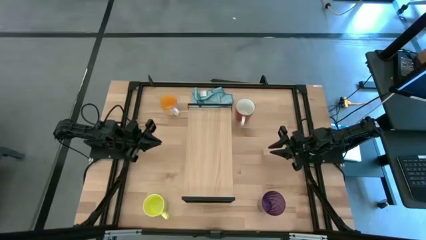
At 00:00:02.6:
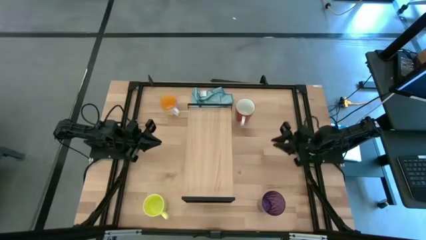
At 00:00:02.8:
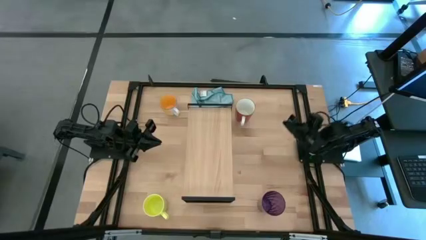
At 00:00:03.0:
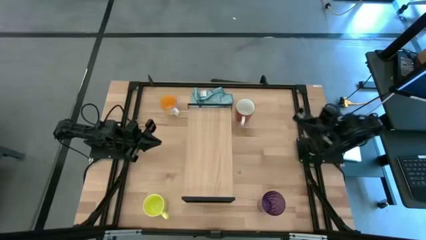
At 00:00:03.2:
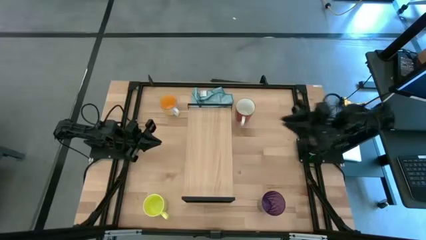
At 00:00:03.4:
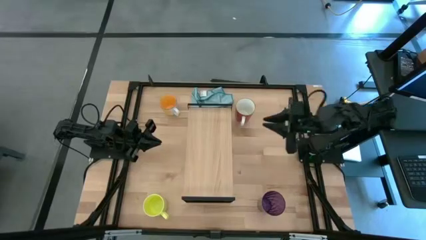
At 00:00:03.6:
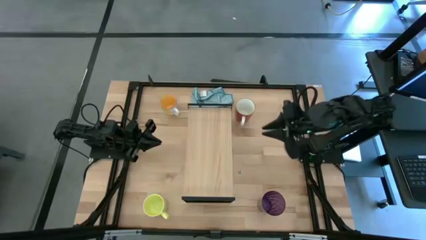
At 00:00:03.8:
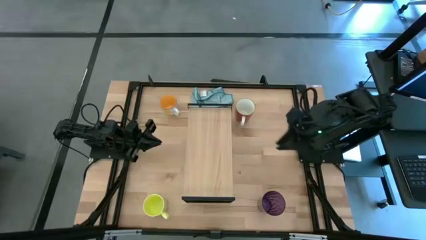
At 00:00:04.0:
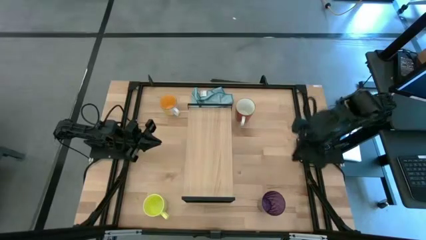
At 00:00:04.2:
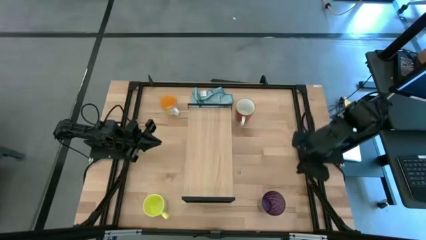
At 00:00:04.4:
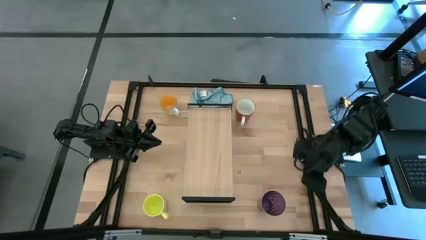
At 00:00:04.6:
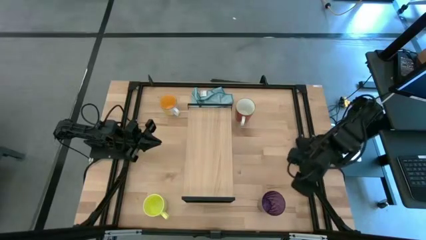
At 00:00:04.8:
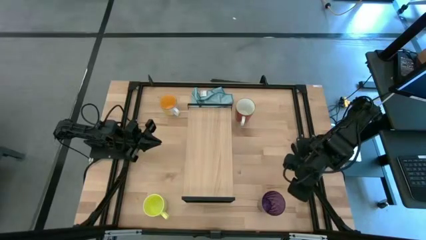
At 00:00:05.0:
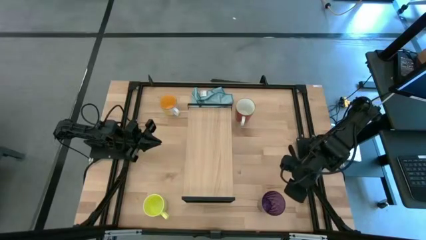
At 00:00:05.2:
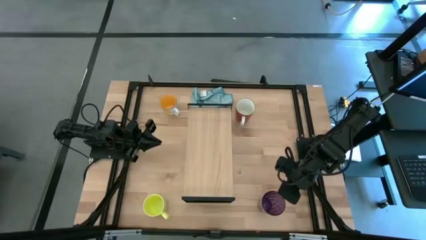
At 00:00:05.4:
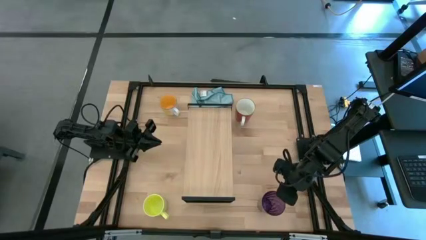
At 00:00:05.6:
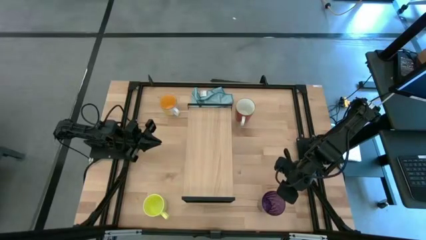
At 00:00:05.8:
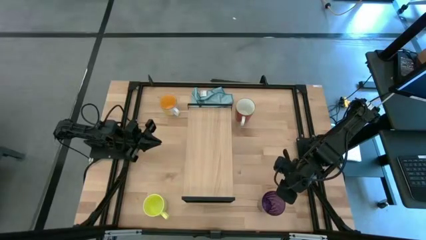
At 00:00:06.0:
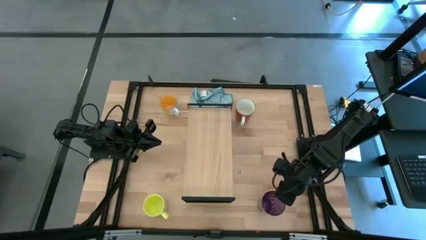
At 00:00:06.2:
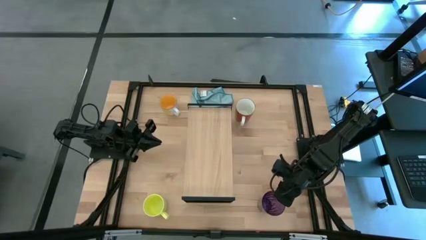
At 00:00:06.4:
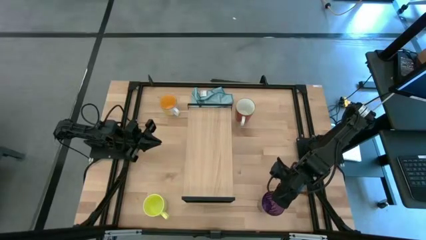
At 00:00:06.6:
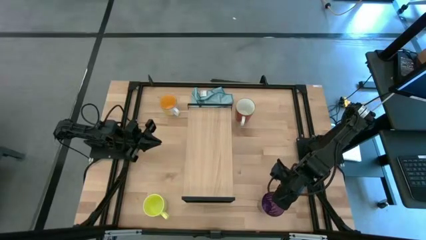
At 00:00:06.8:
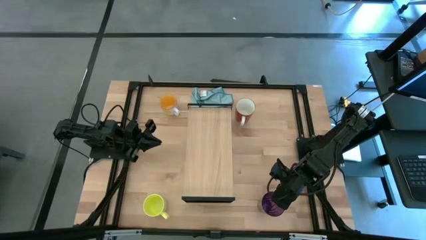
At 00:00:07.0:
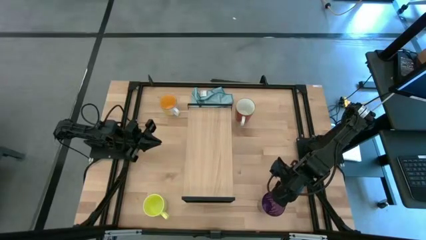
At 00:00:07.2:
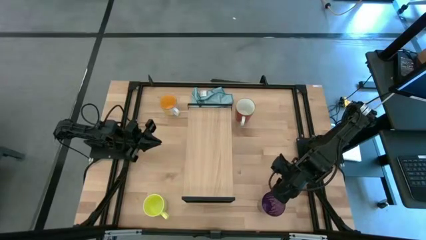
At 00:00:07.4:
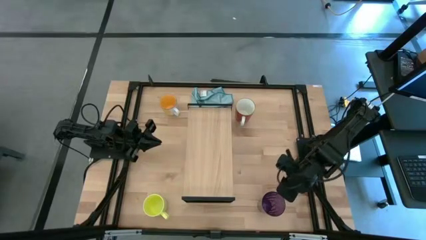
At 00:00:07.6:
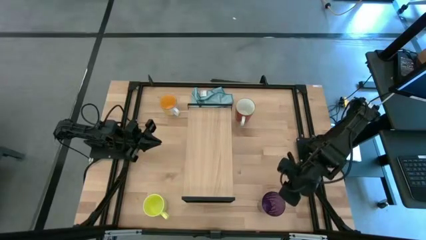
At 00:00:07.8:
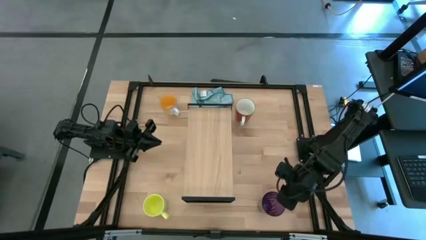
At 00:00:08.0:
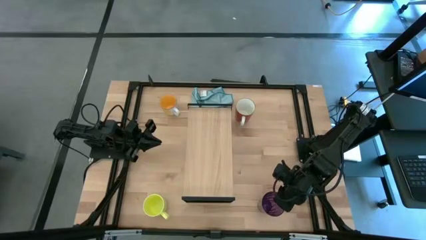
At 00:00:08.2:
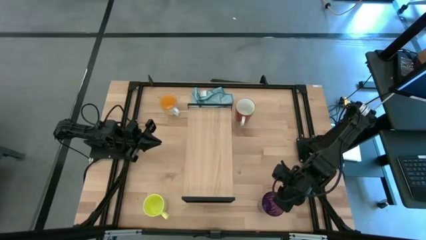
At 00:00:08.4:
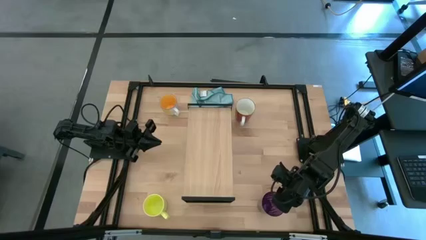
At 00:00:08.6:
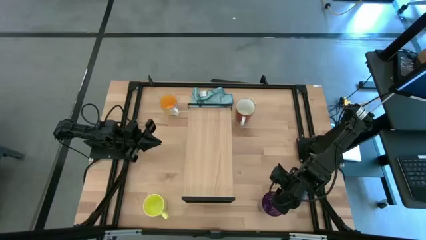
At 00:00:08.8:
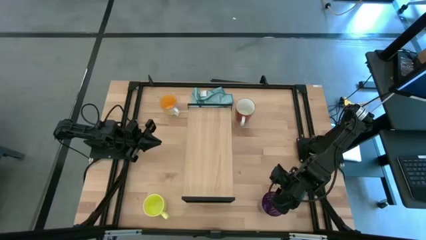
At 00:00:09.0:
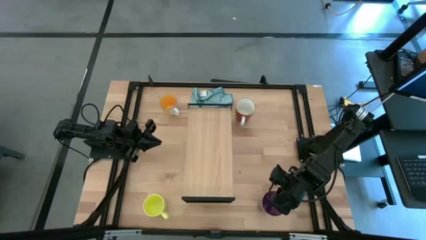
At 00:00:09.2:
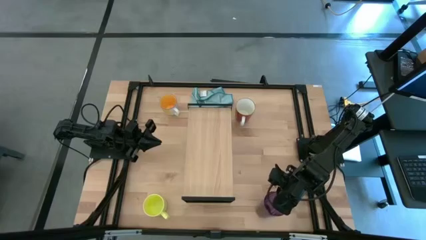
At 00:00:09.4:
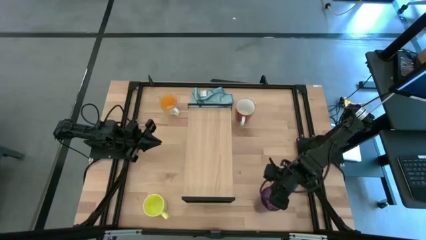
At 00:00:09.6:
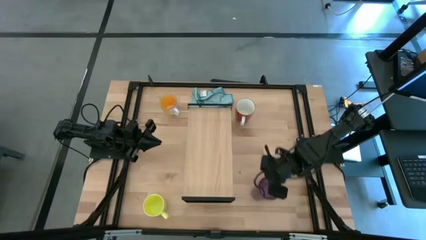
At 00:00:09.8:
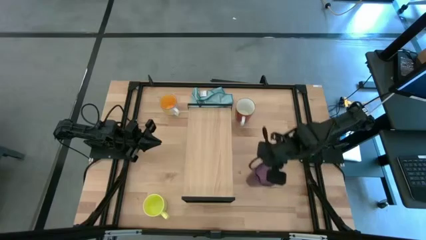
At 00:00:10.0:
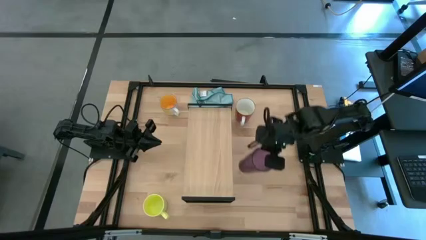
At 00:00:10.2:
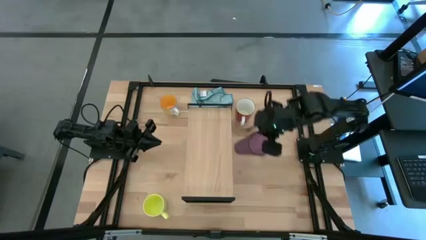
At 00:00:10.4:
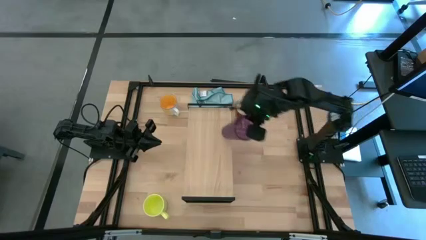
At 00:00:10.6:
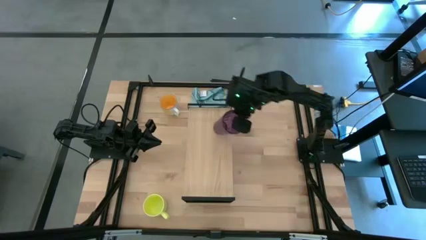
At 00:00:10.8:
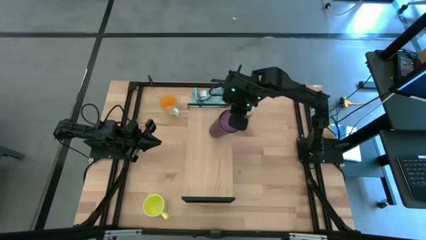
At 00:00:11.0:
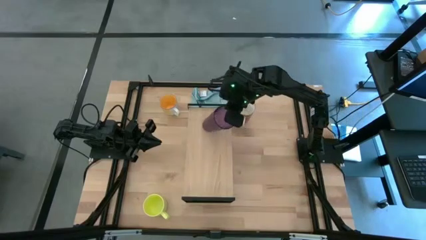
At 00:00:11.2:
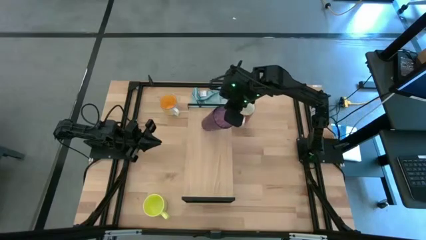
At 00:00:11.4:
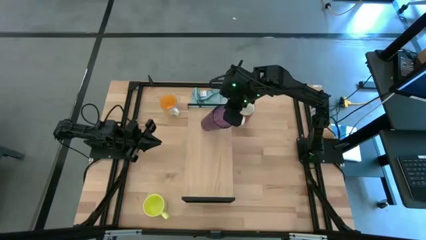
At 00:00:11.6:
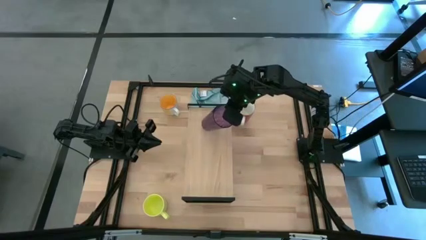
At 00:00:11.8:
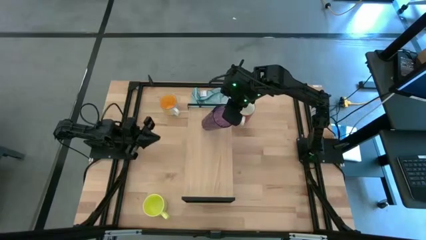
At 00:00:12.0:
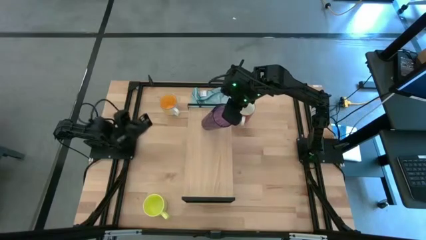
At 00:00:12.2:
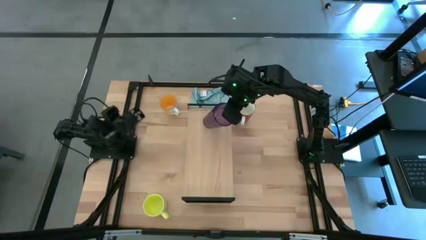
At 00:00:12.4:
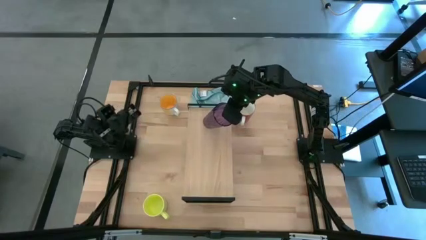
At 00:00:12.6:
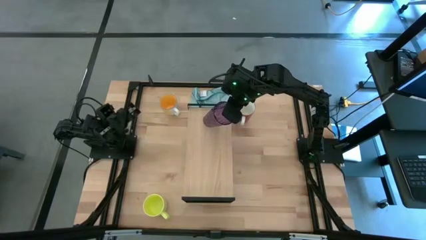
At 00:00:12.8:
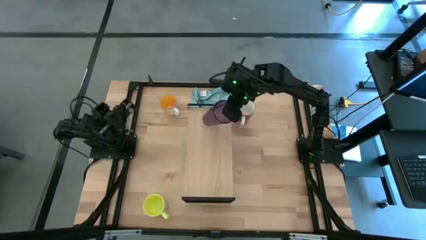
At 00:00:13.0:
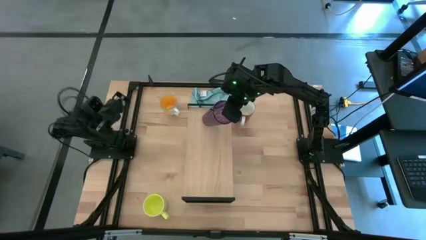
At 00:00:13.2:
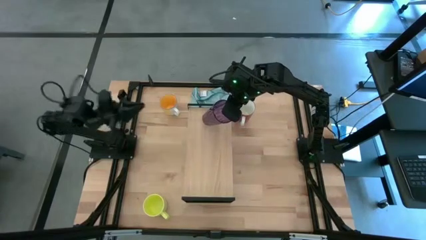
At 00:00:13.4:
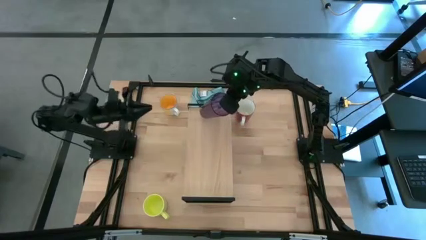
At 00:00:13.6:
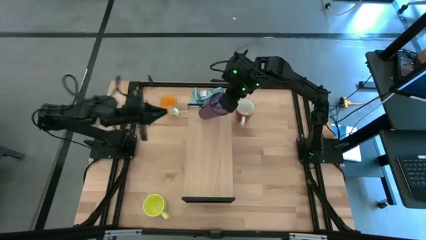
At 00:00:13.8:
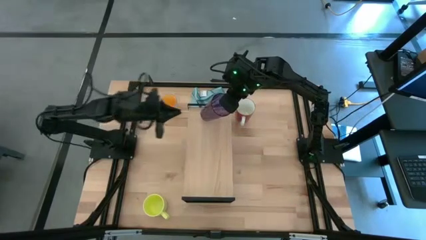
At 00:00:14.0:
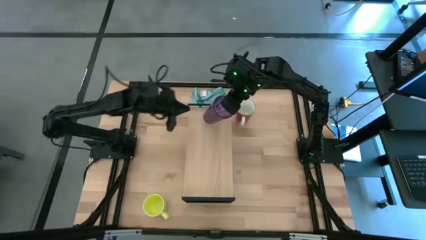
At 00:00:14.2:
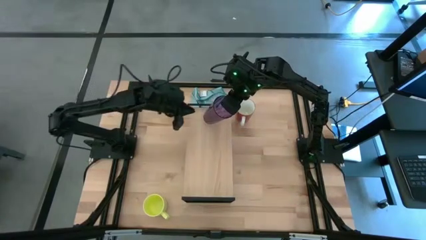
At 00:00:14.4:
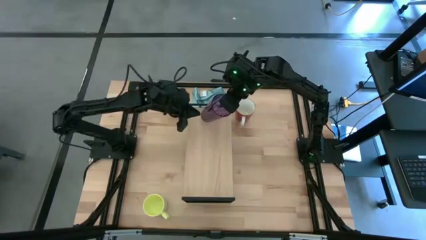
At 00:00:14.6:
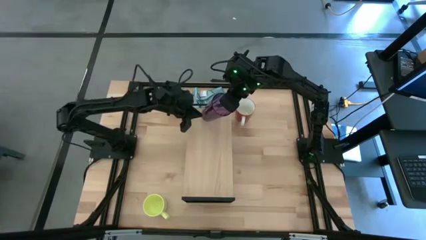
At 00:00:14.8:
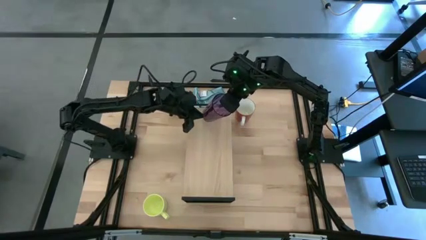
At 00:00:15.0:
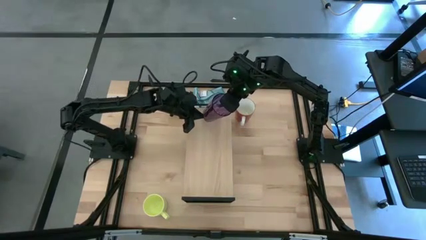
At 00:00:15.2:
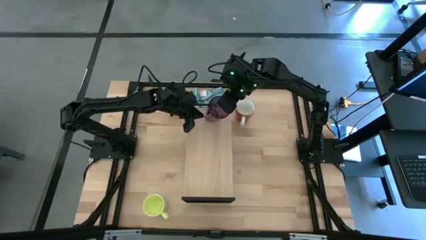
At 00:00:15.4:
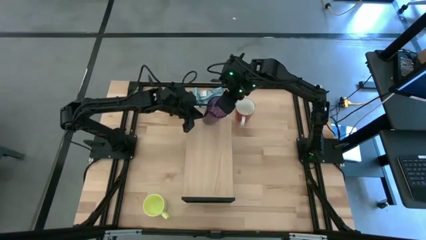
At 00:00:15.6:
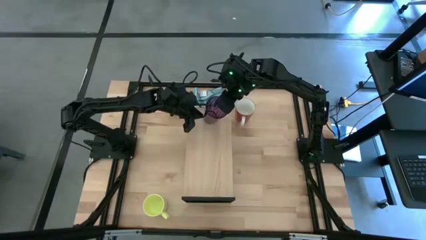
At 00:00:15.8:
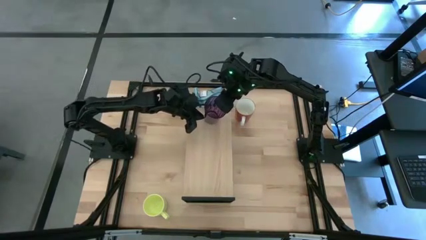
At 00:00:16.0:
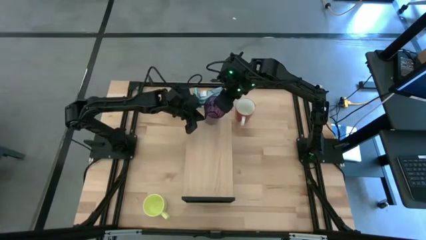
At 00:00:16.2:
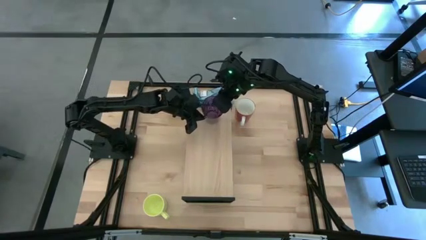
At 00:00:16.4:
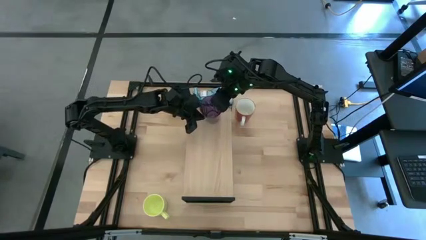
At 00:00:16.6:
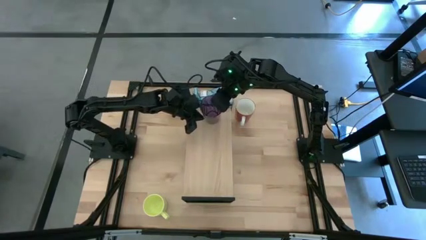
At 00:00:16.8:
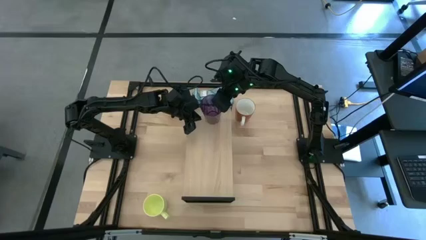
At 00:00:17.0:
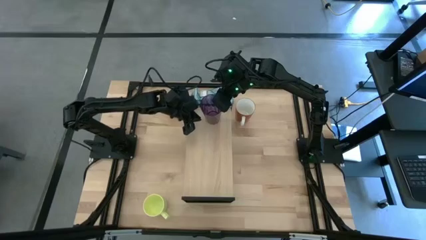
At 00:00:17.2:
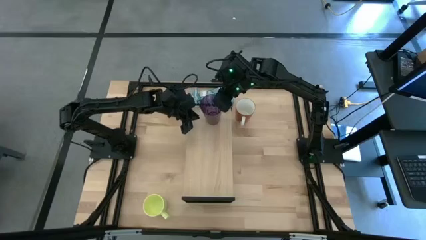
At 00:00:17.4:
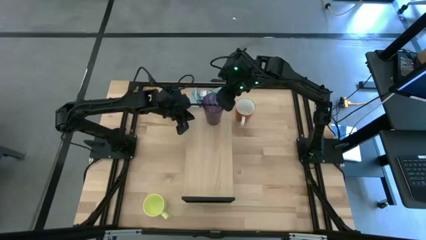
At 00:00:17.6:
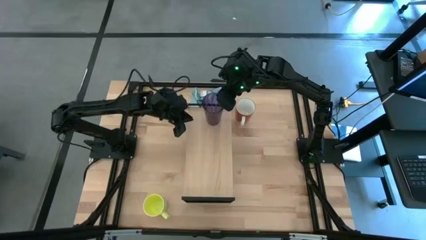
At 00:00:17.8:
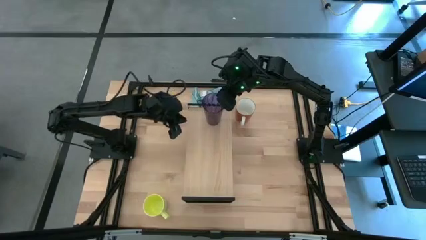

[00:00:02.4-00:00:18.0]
Task: Stack small to large cups/mugs on shelf
Put the violet cup on the shelf
